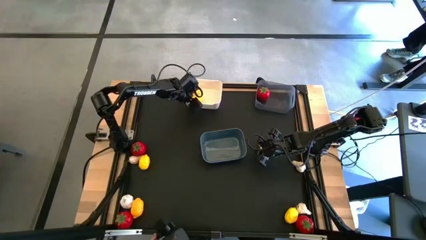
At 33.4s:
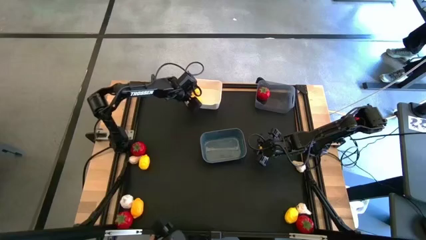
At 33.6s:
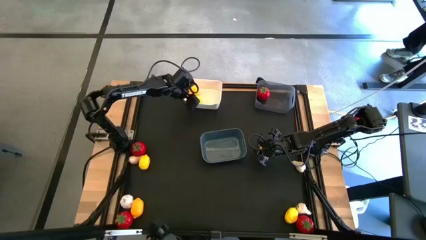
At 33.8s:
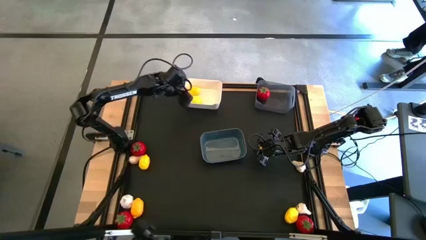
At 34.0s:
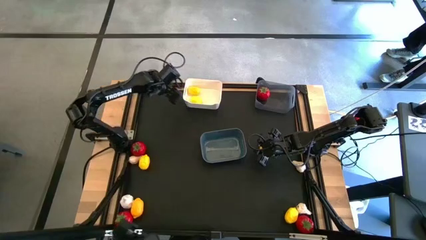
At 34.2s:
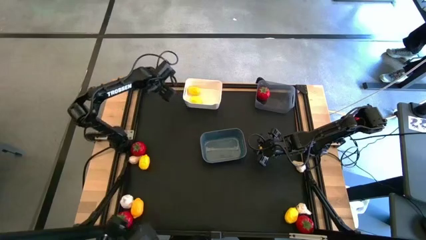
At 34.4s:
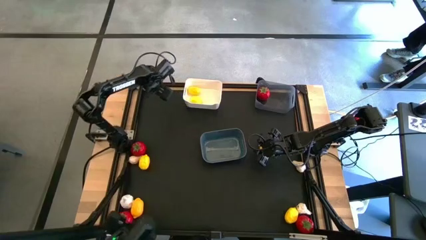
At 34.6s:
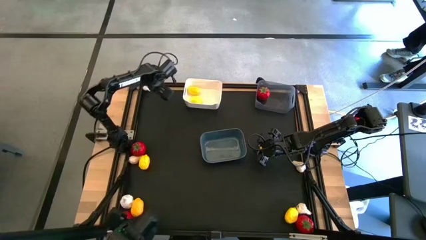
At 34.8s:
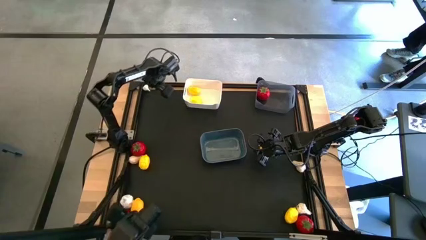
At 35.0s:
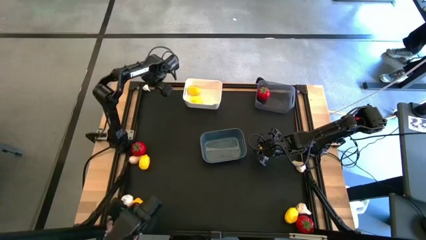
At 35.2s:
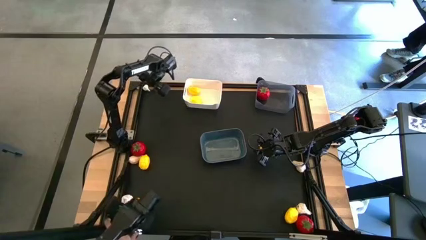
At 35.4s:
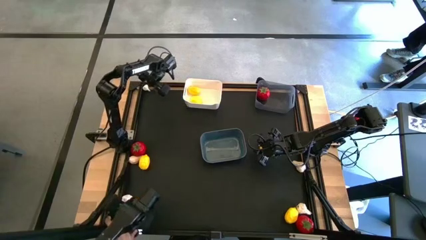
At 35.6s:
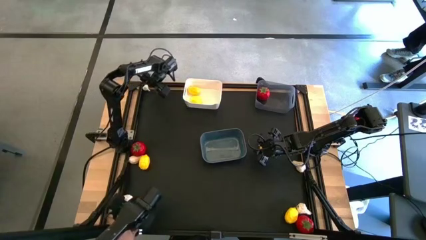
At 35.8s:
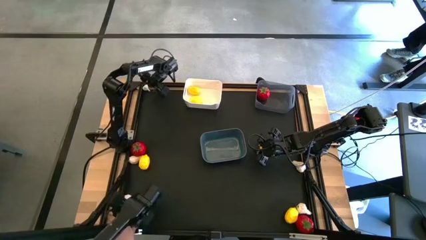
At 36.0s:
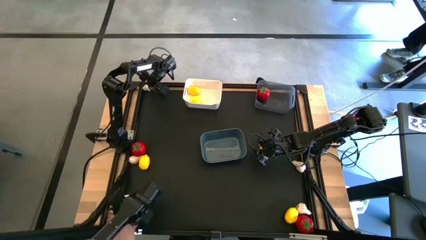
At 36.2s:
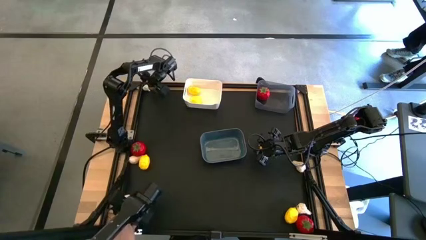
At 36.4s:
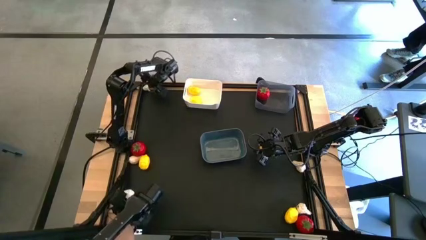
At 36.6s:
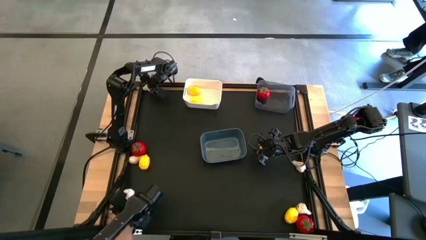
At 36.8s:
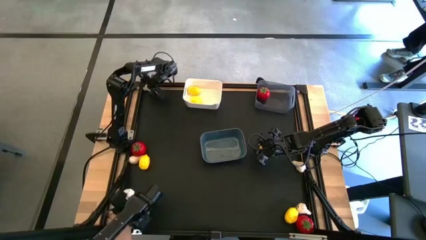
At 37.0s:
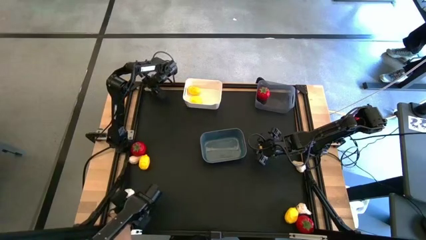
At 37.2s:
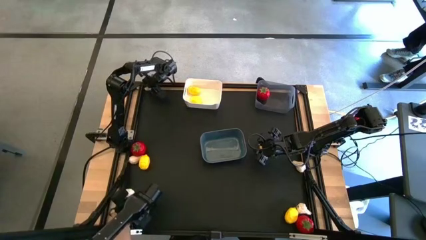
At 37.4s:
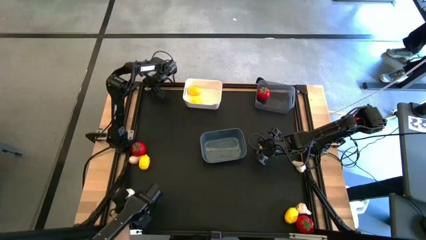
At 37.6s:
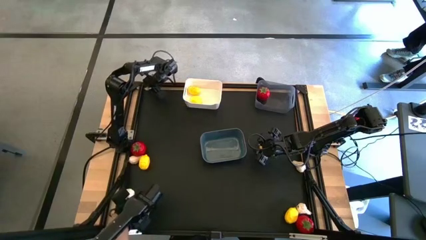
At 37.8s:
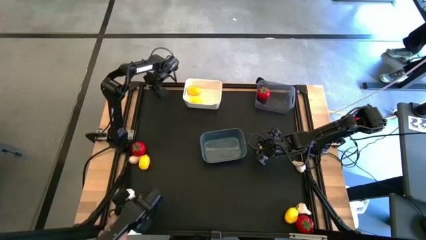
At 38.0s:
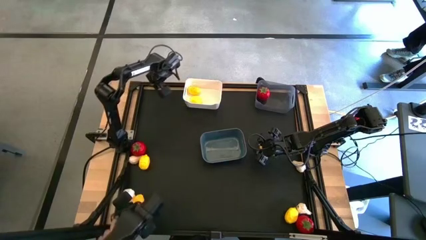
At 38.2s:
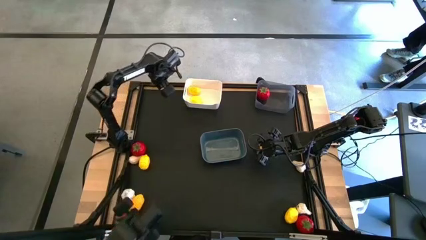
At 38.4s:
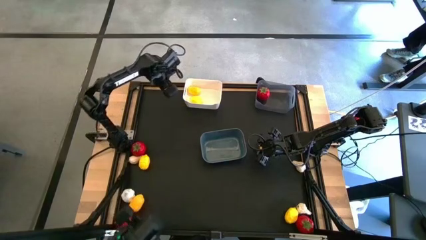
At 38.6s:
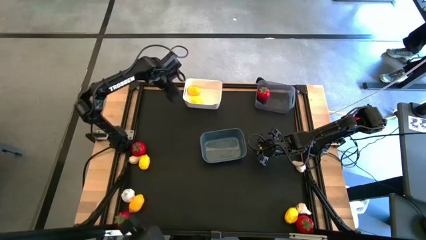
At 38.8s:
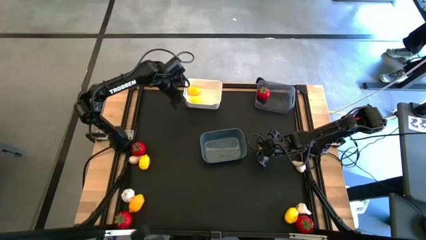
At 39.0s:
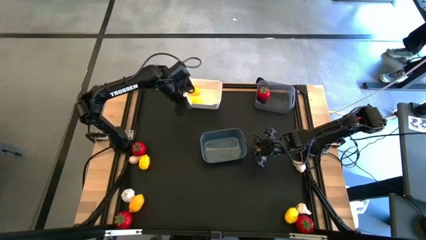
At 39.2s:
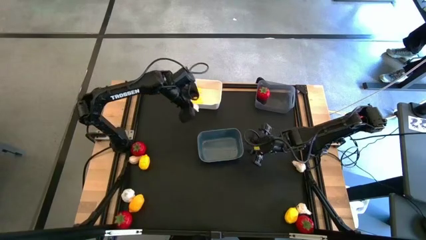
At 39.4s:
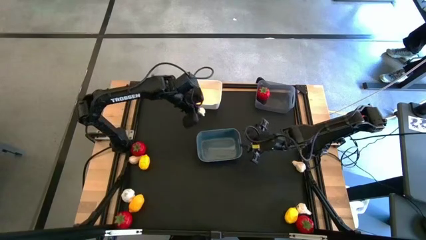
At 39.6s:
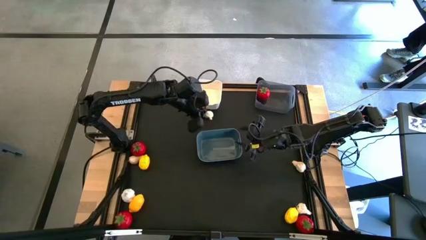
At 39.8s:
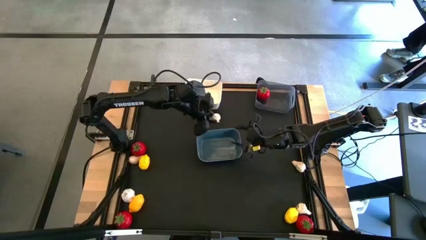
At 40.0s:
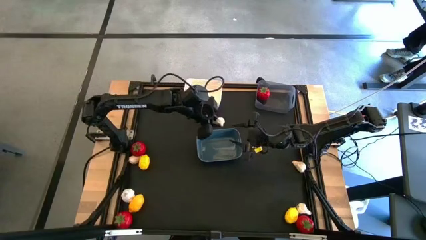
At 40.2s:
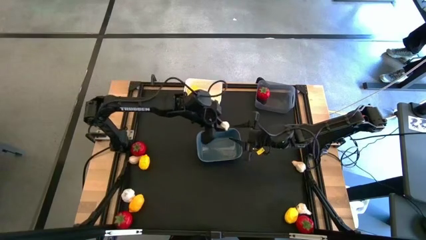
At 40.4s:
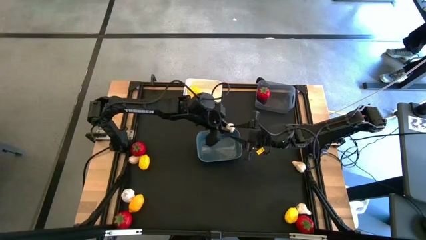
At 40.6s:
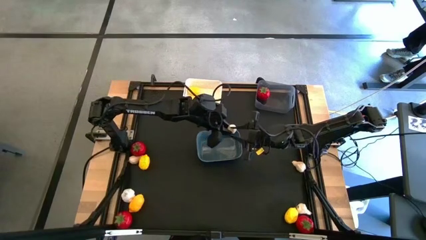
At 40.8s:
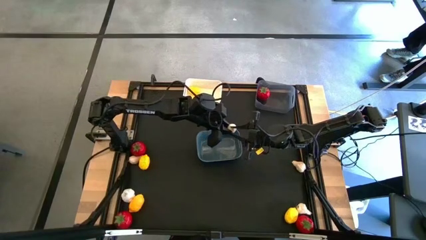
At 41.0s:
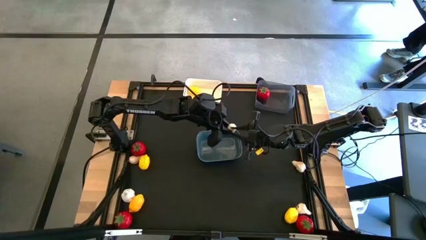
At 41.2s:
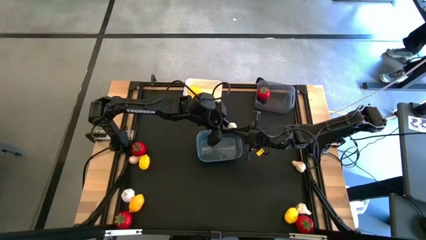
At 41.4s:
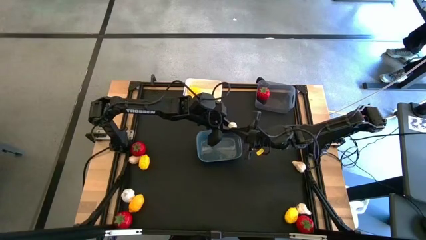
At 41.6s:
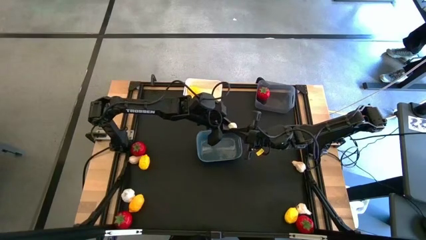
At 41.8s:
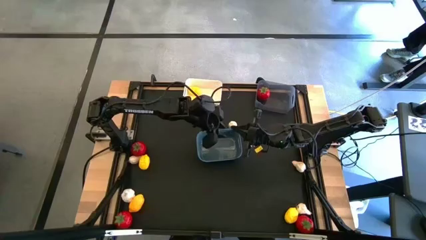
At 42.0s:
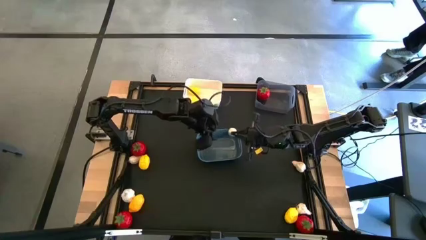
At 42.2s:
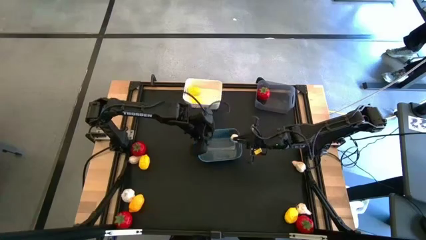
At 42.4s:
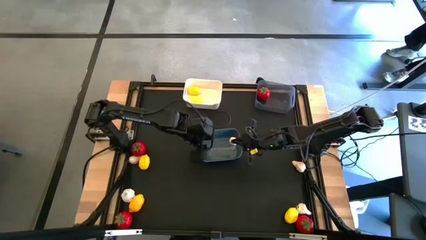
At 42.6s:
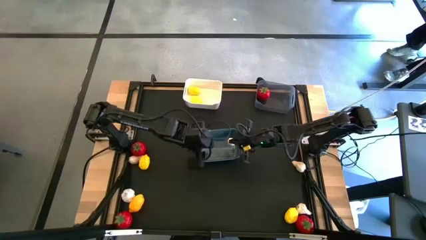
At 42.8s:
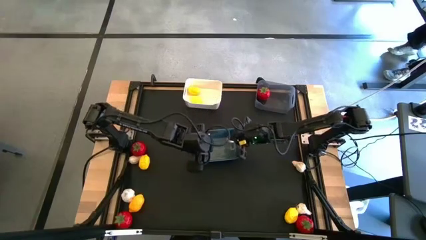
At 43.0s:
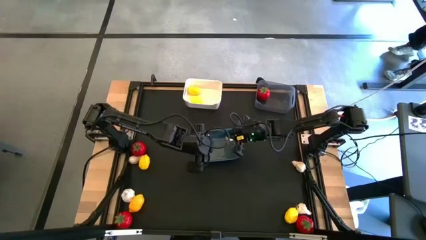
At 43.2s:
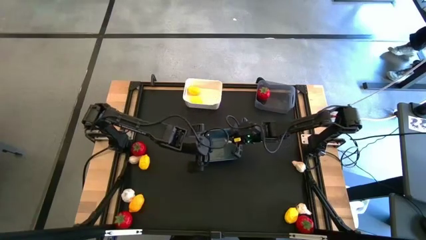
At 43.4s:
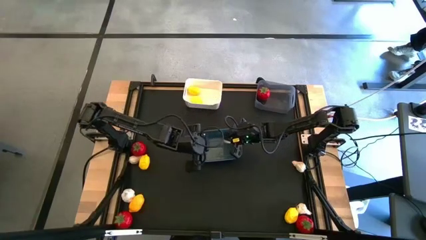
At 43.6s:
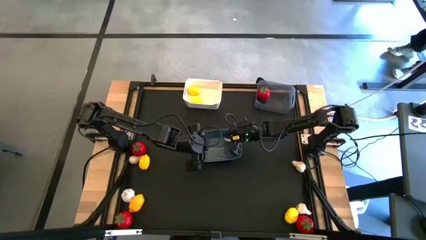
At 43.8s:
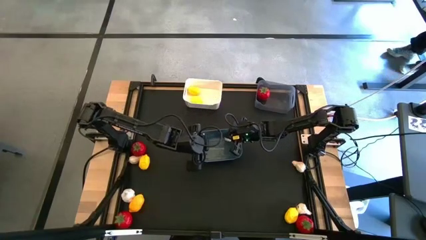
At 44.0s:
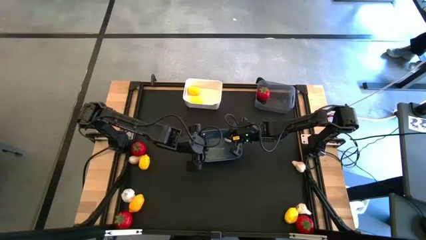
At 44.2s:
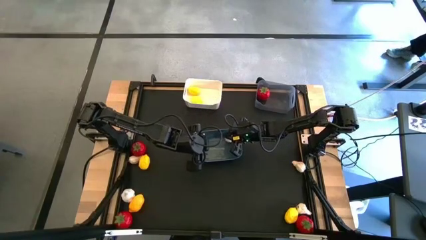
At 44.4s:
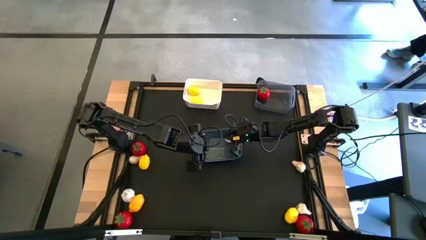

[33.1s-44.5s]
Task: Sort produce into baskets
Put the white garlic into the blue bin

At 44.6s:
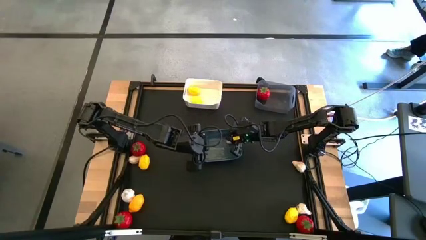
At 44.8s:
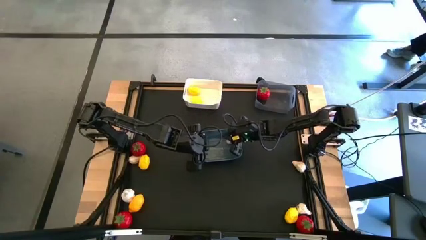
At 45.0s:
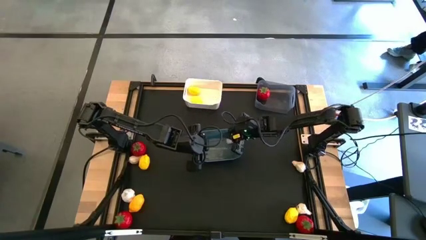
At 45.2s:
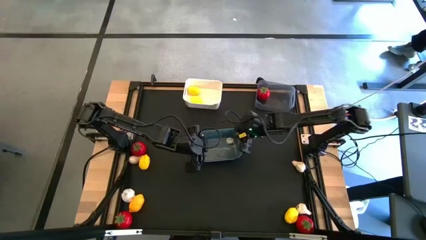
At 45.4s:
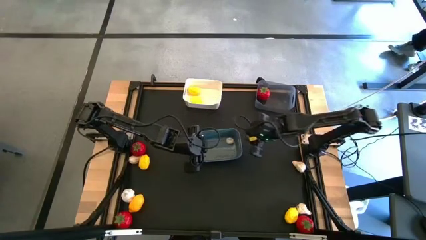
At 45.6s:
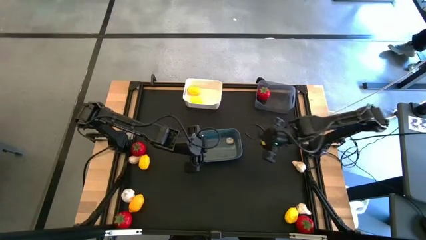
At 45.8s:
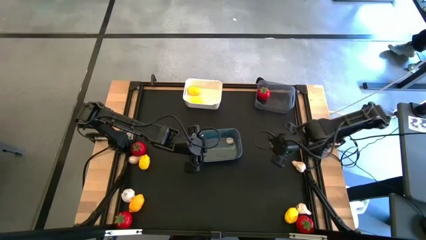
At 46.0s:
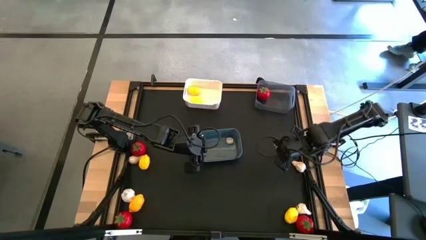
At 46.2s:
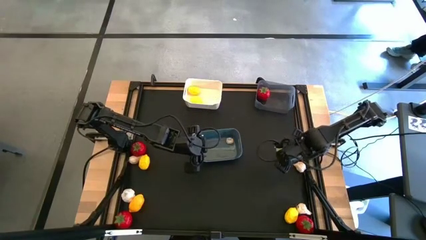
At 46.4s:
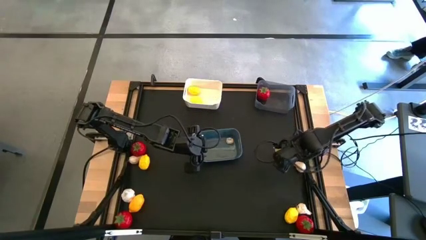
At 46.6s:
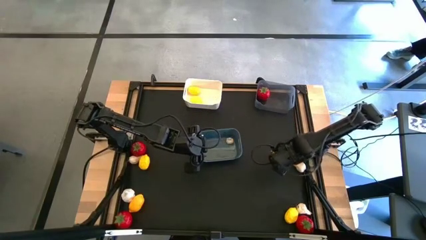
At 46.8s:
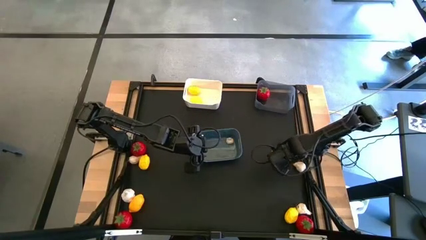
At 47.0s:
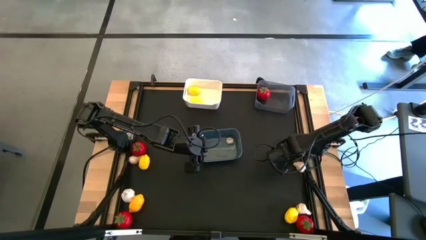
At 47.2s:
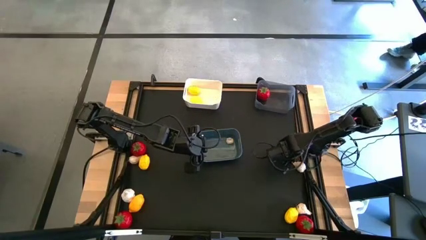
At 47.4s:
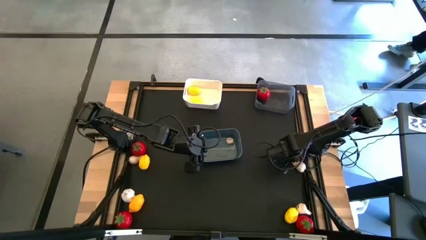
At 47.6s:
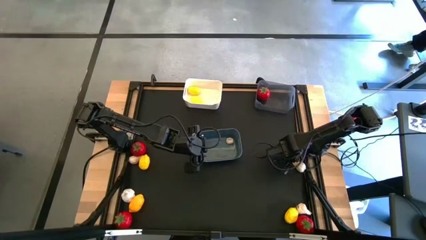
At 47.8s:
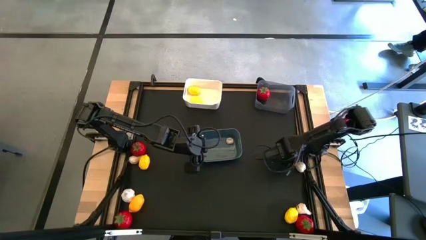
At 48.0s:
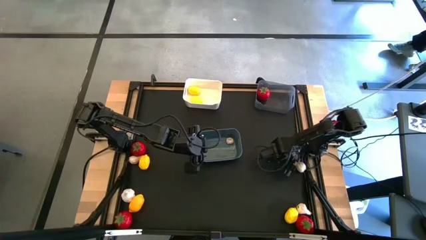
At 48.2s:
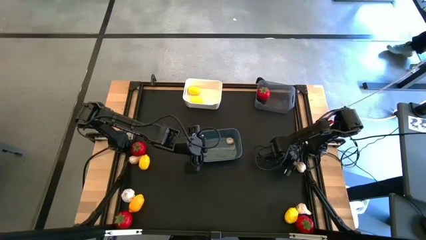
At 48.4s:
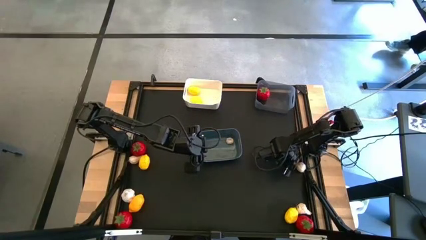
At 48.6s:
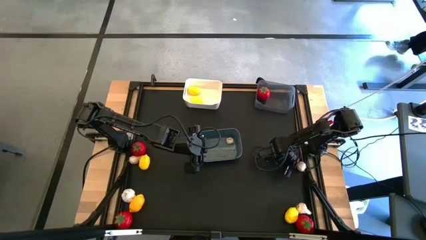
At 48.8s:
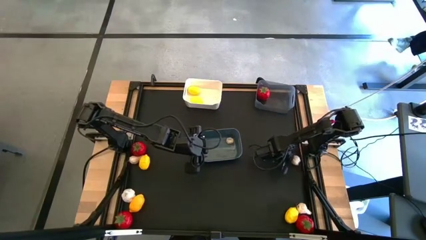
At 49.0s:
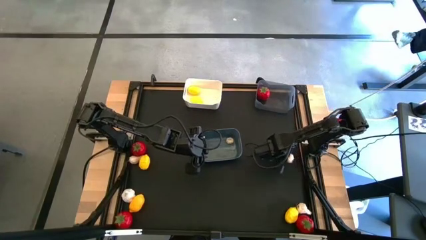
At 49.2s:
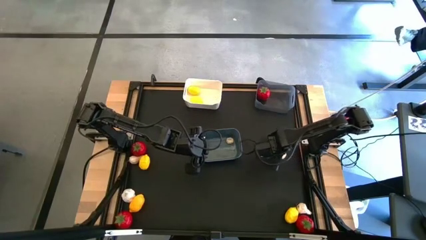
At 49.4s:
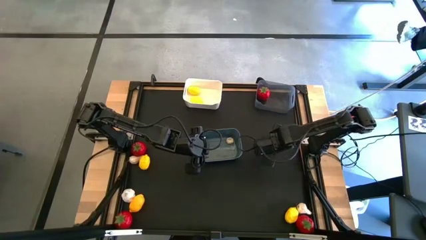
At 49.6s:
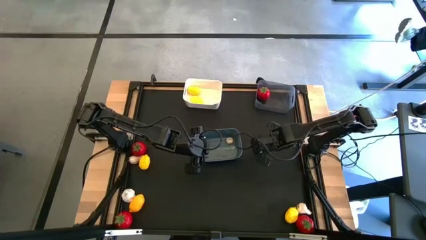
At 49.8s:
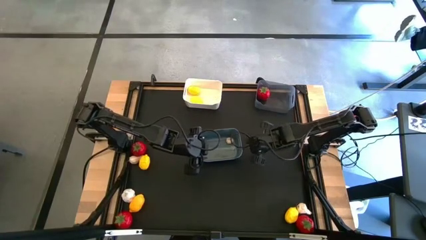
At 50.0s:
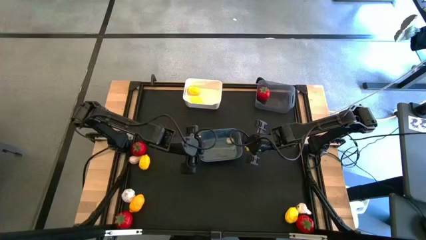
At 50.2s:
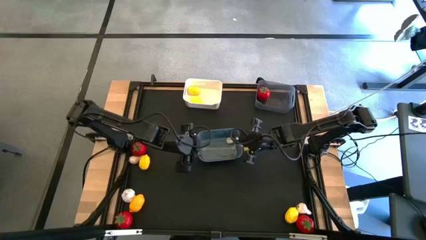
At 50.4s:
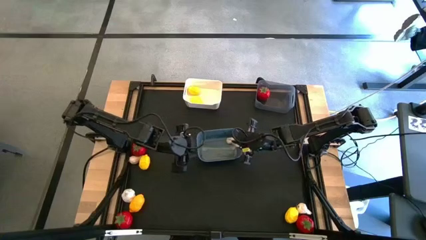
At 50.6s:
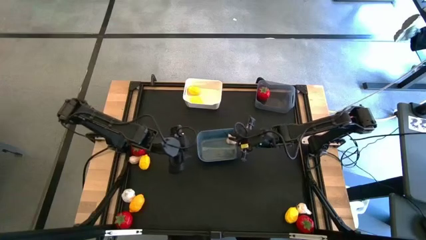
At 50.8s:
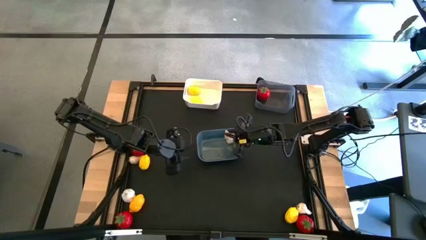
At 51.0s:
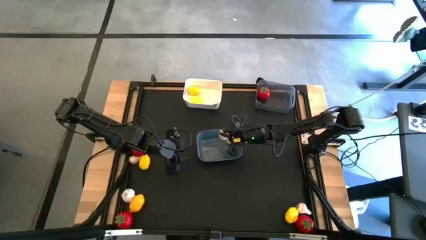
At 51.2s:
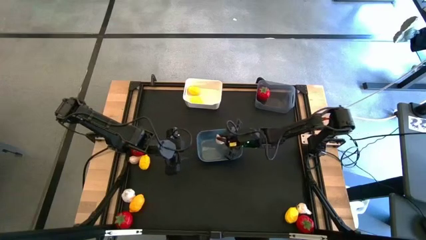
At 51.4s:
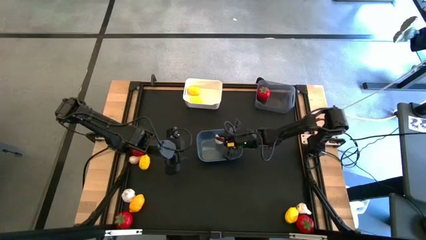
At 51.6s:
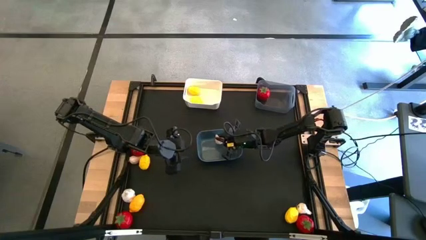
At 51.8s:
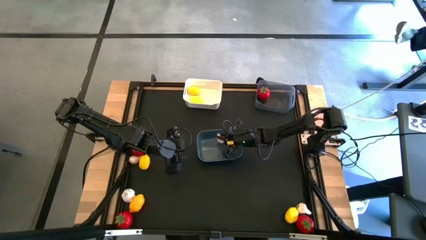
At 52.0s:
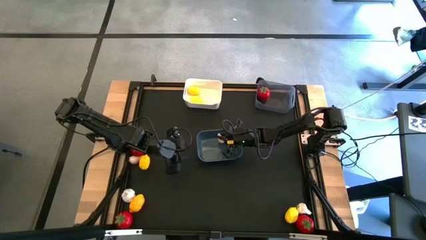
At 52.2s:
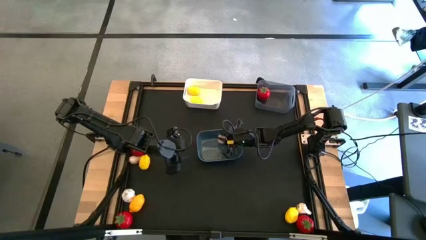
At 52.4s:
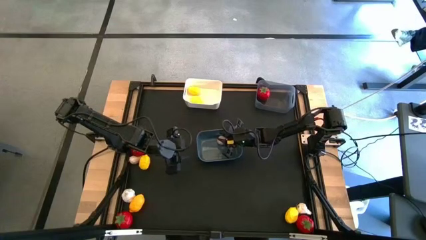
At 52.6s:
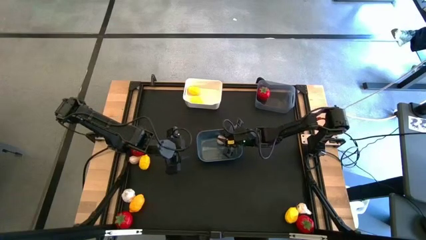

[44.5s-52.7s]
Put the white garlic into the blue bin
